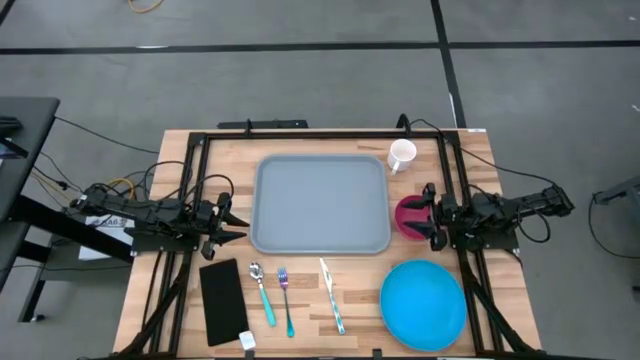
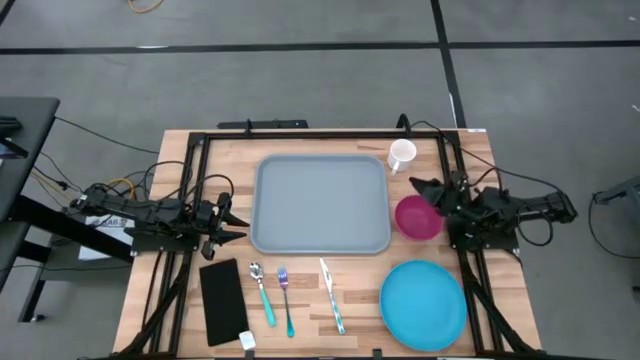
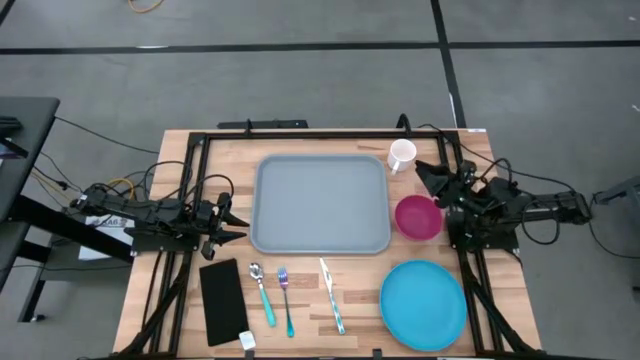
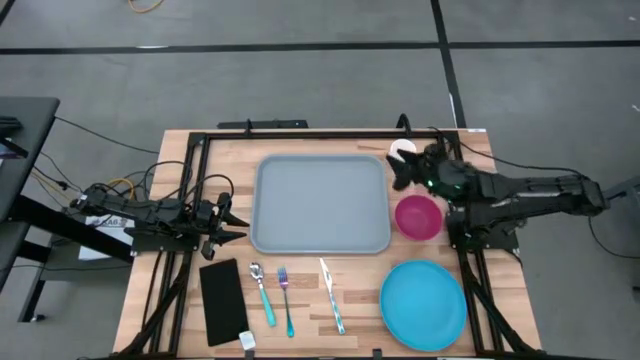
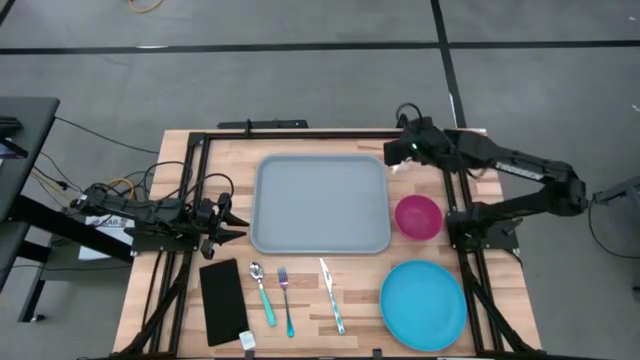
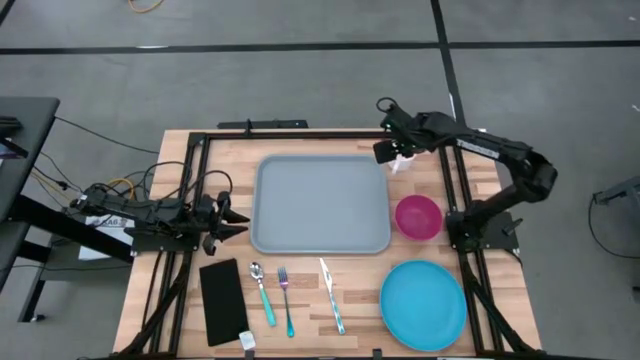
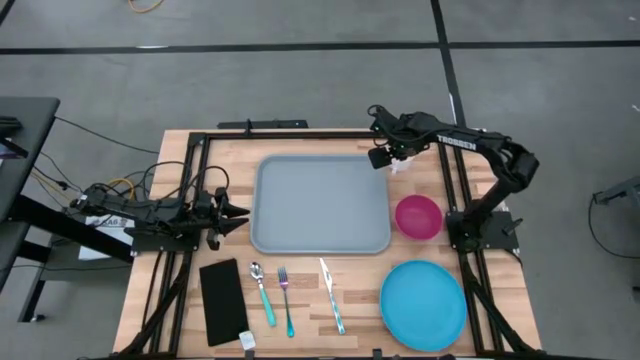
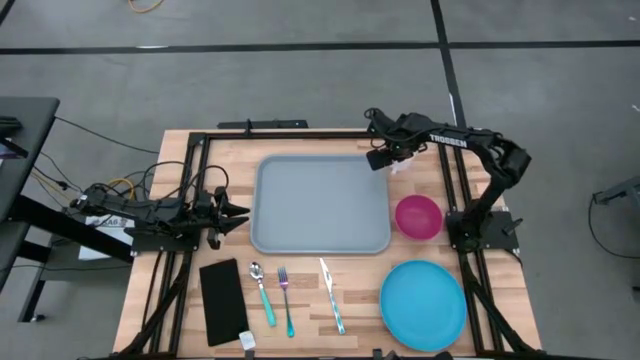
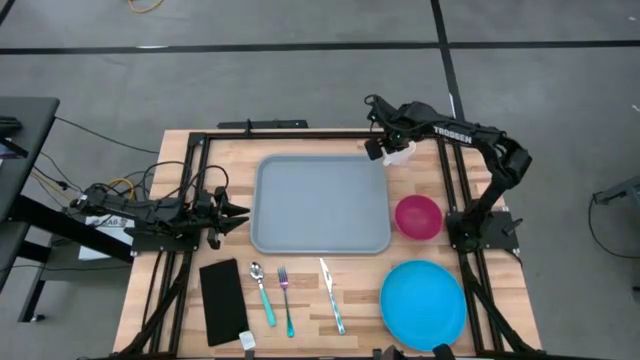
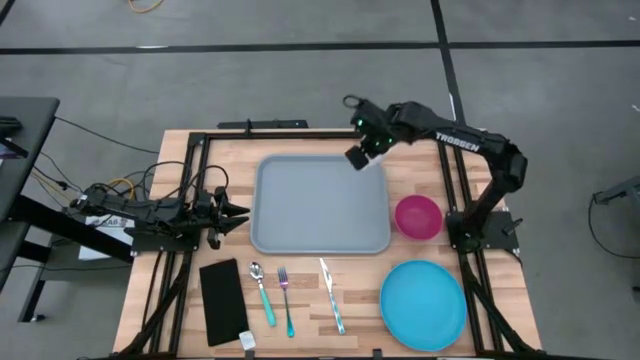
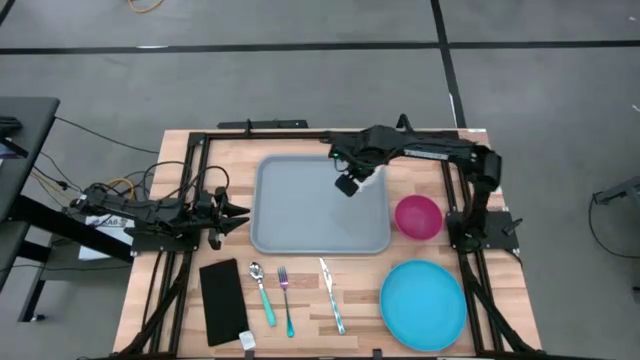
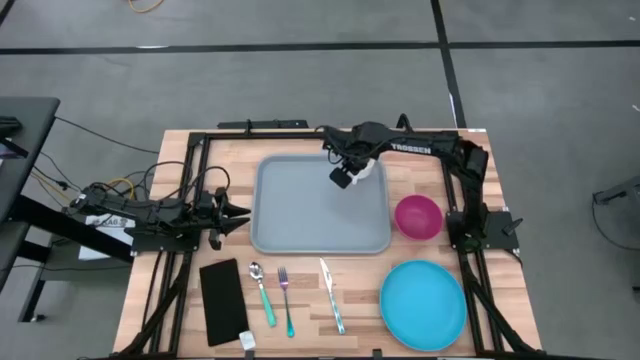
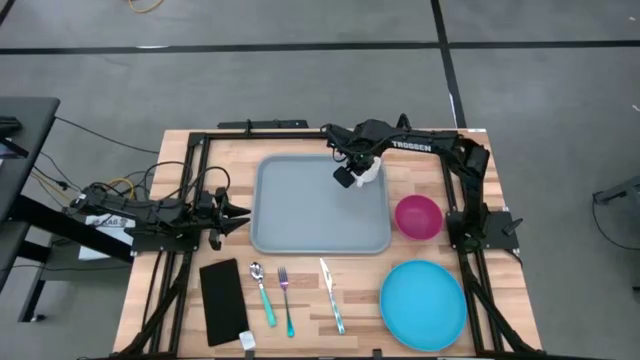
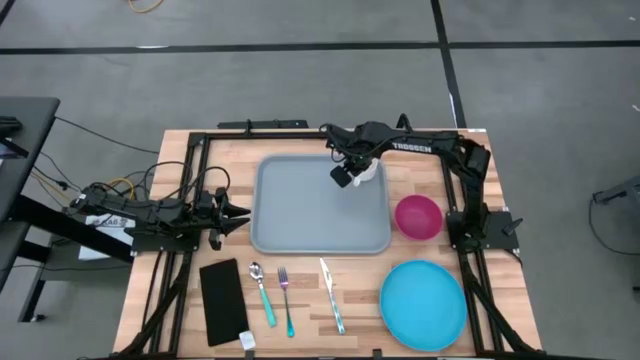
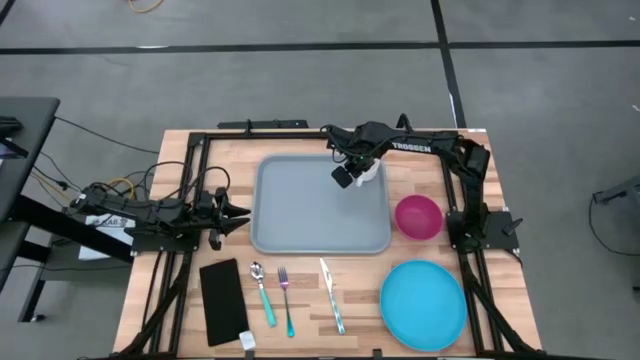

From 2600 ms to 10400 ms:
Task: Set up tray
Put the white mug on the gray serving tray

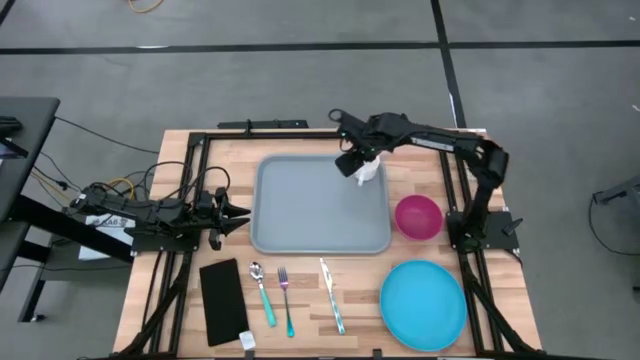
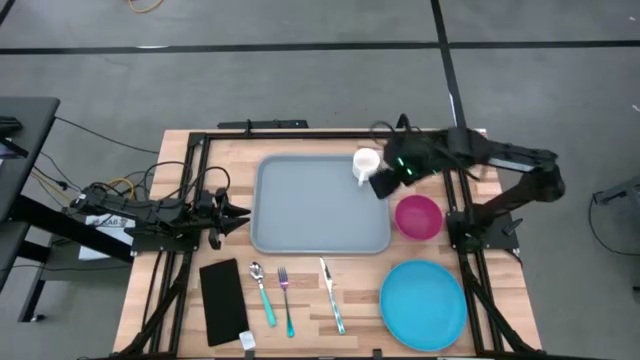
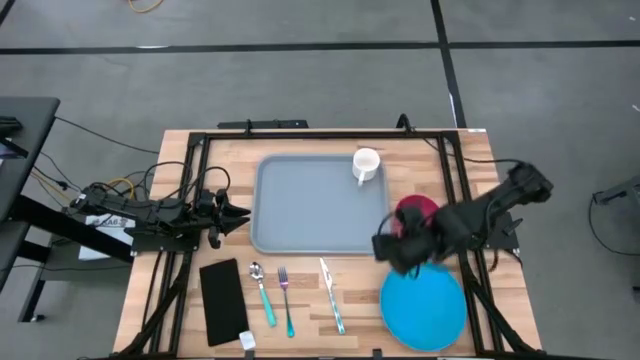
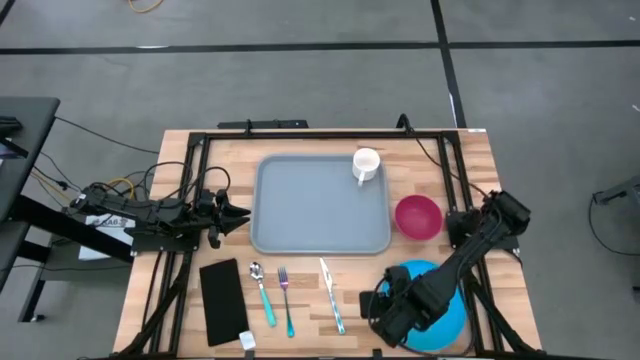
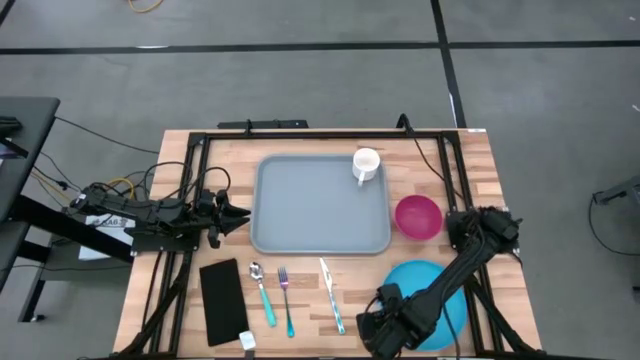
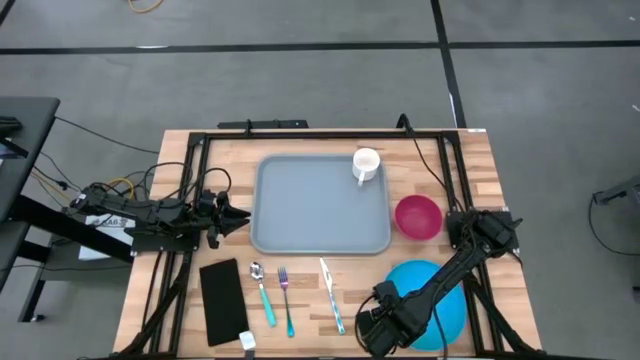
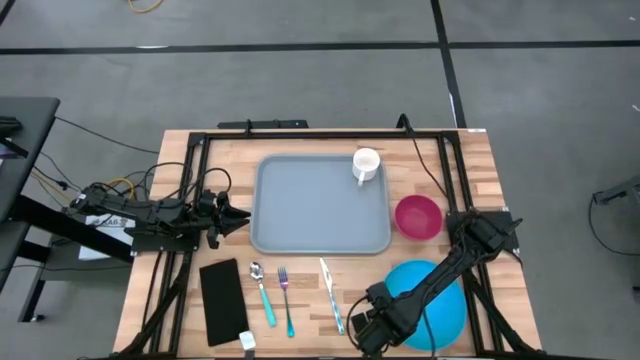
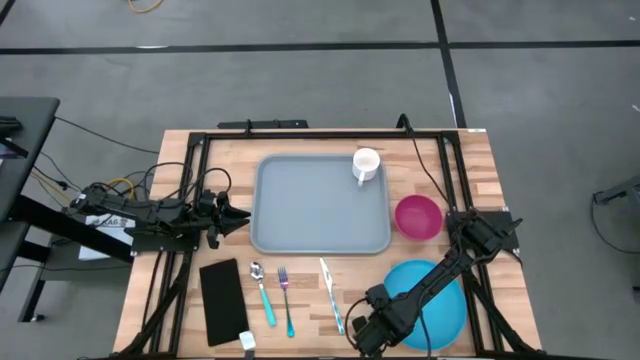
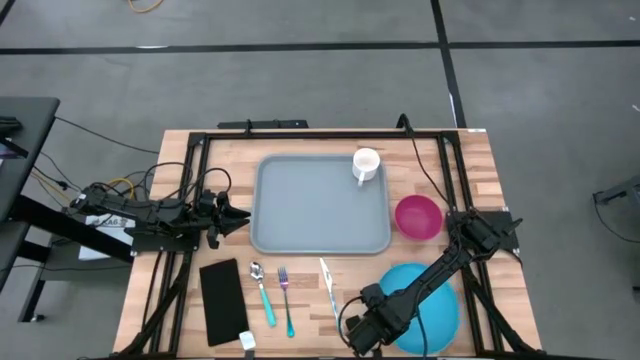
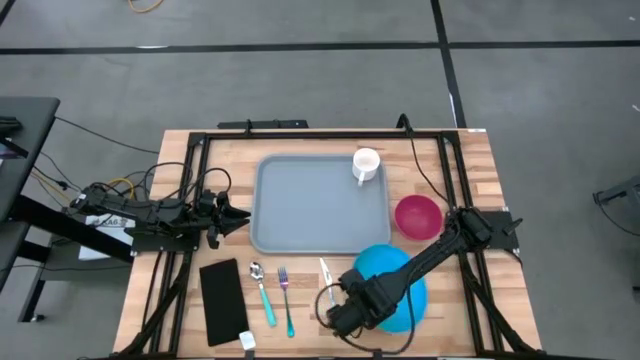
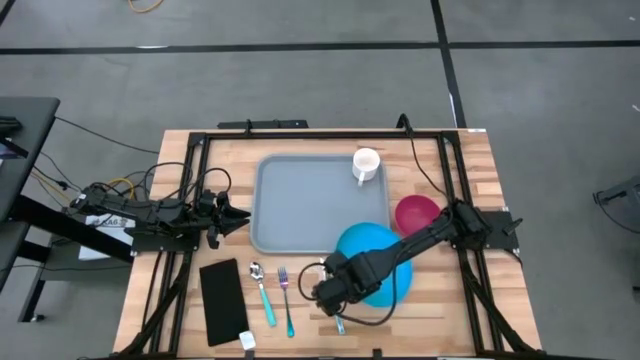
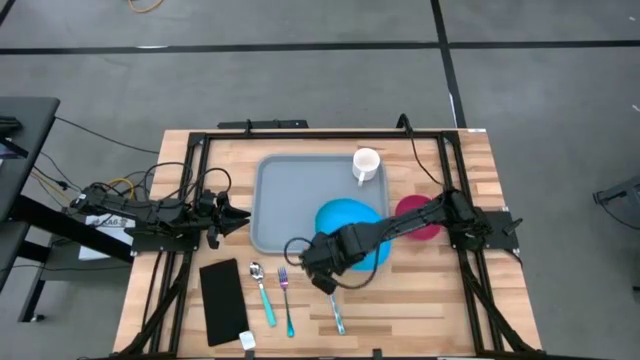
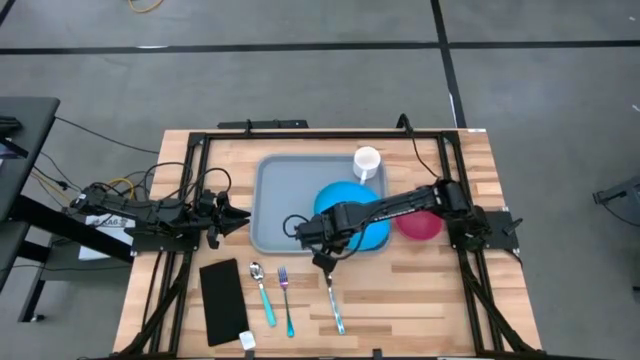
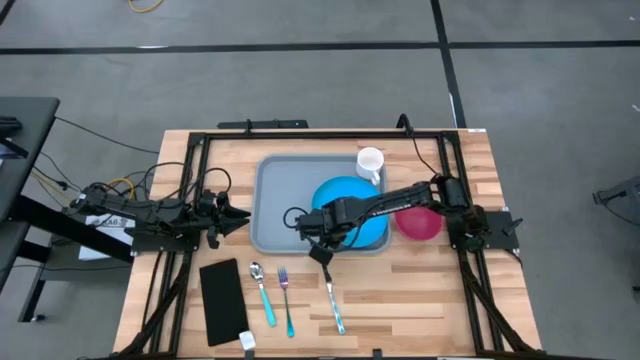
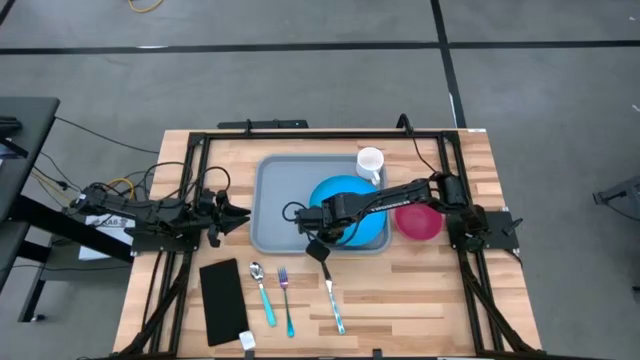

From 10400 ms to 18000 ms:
Put the blue plate on the gray serving tray

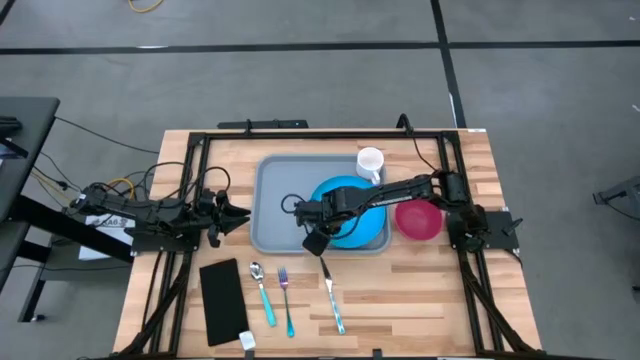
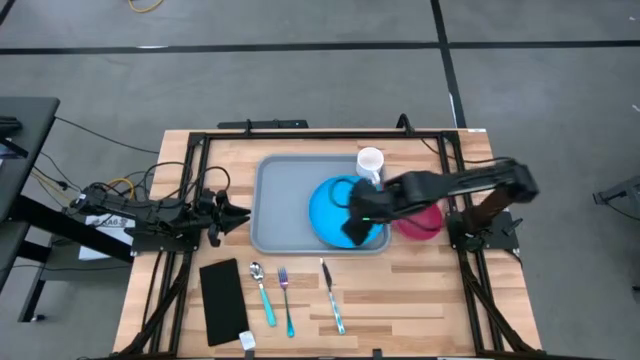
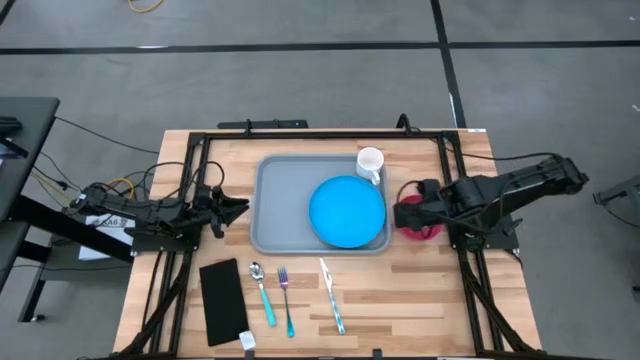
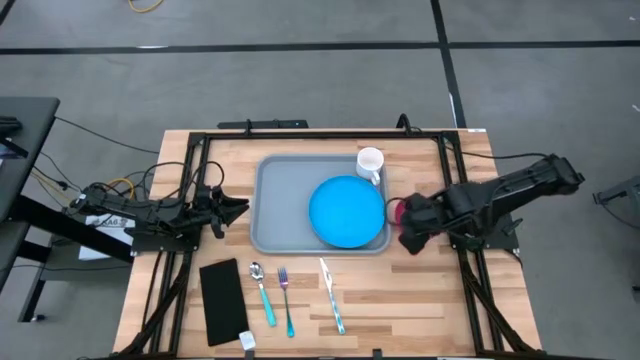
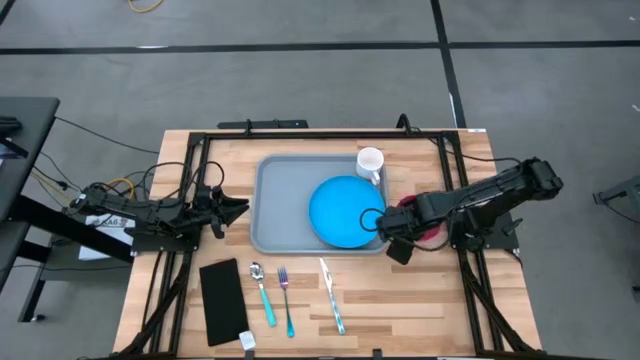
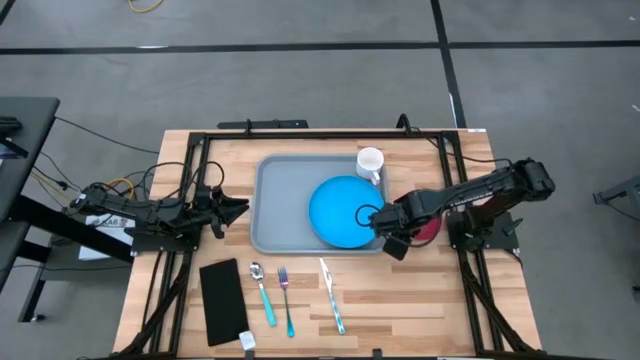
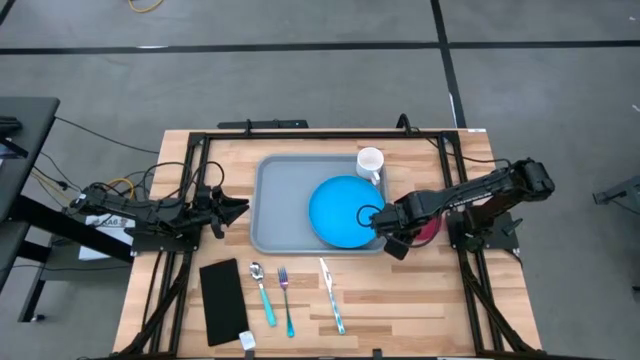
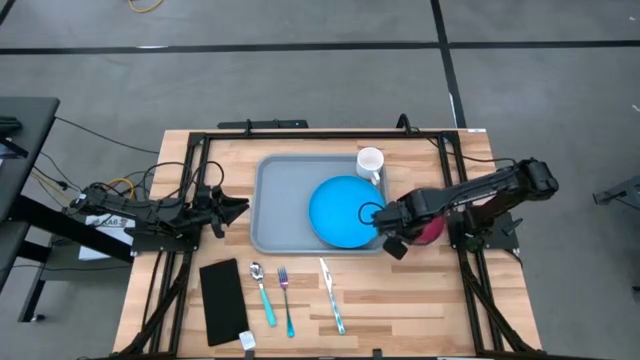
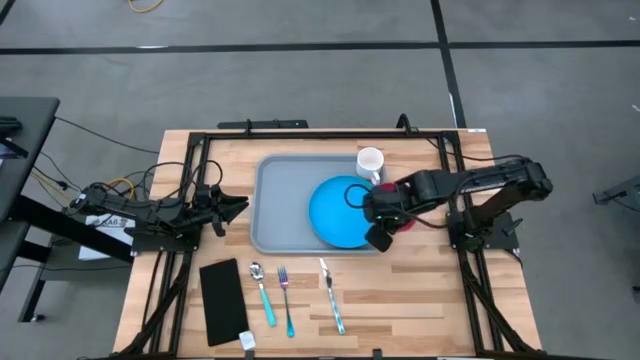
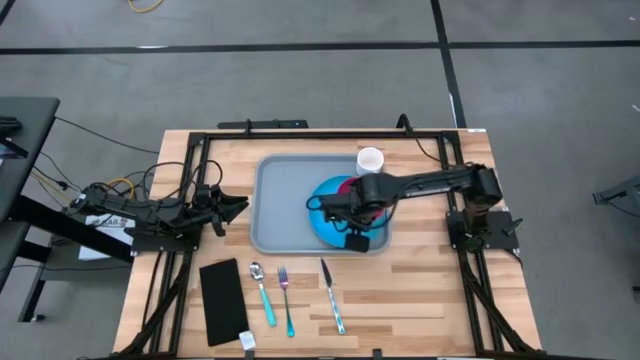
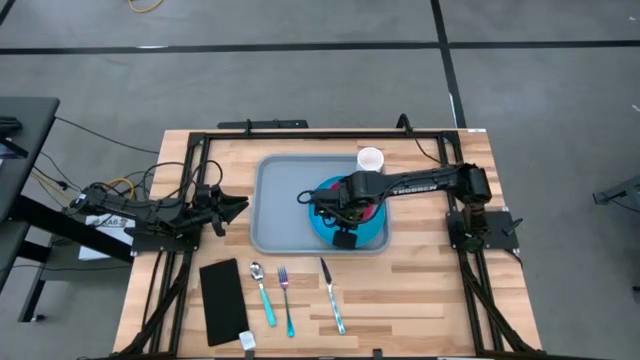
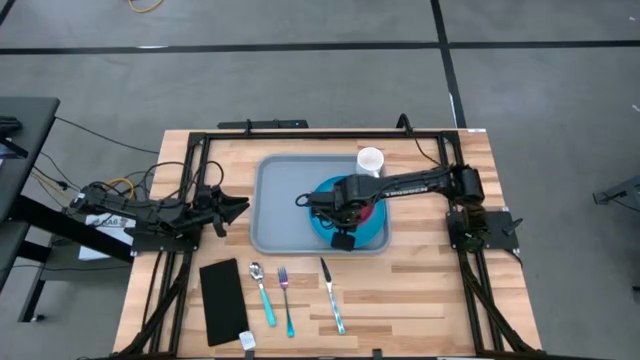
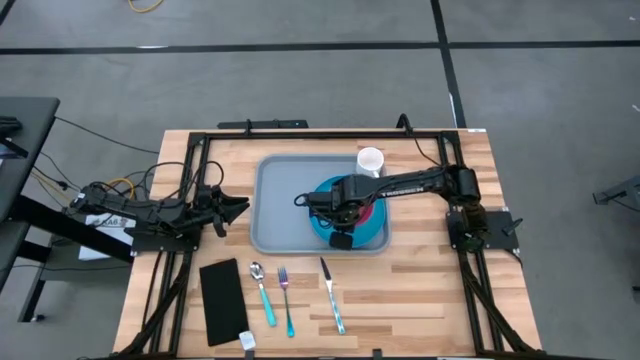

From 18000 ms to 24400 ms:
Put the red bowl on top of the blue plate
